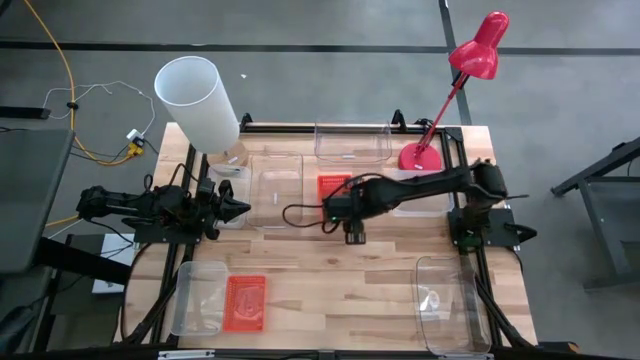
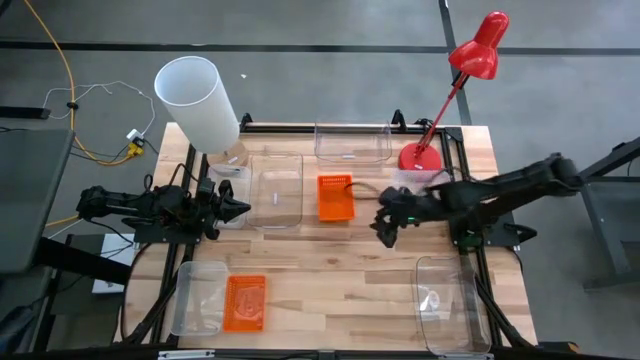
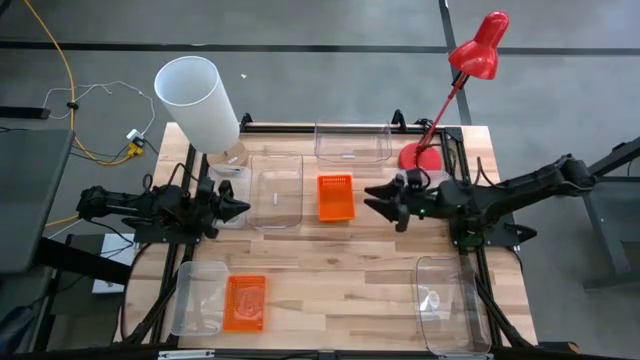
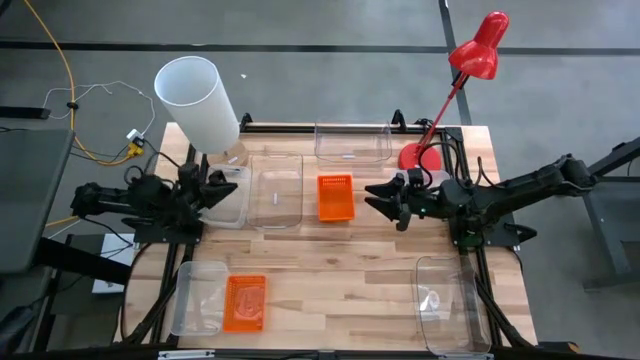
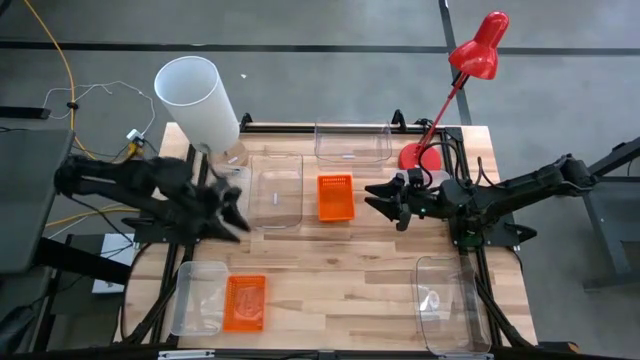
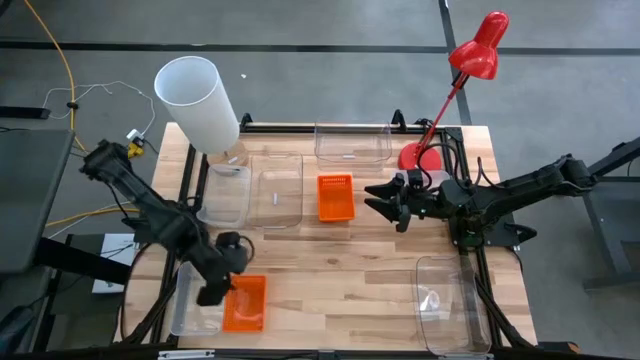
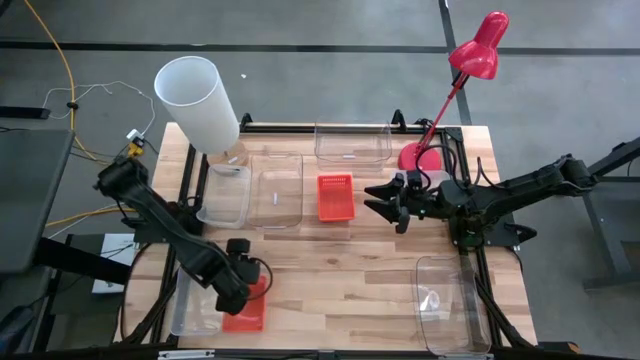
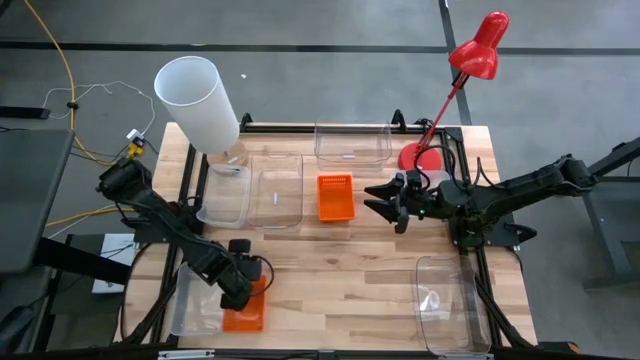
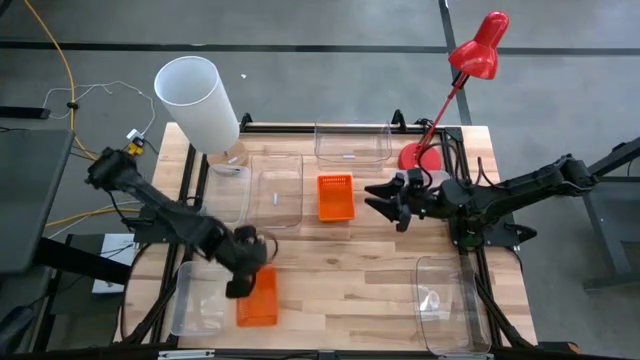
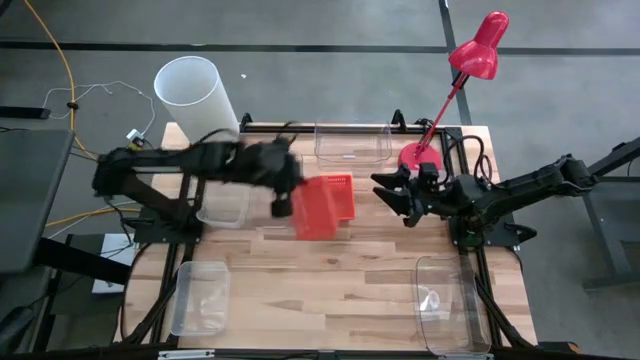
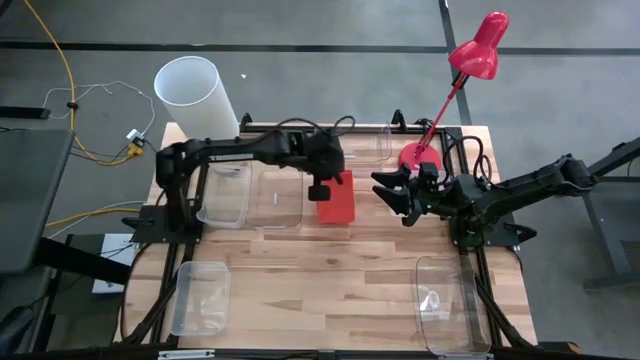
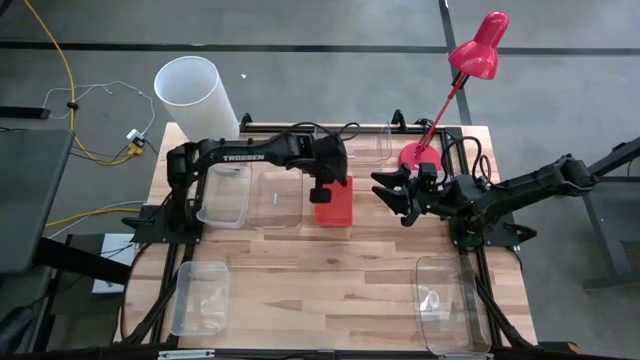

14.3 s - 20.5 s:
Stack the bottom orange bin on top of the top orange bin

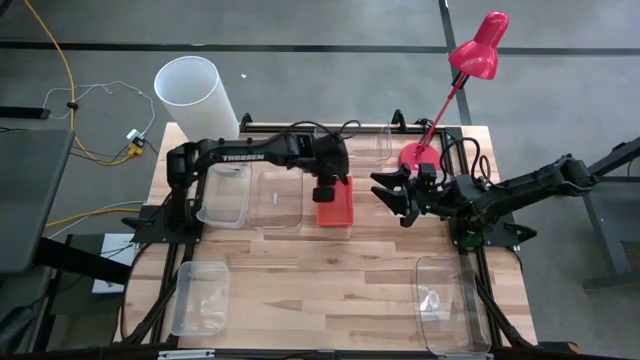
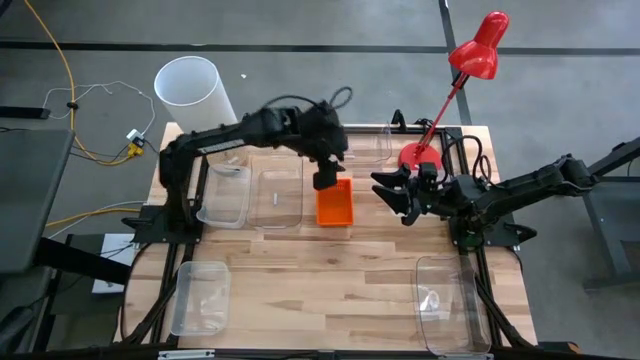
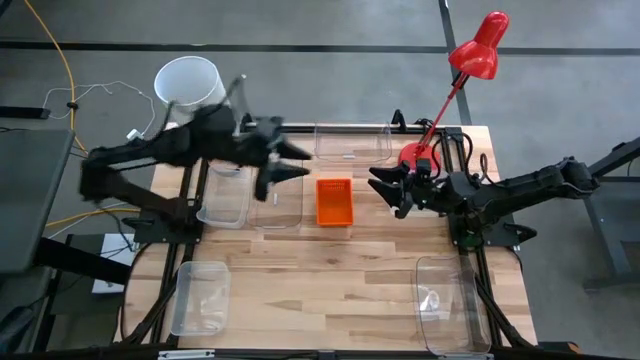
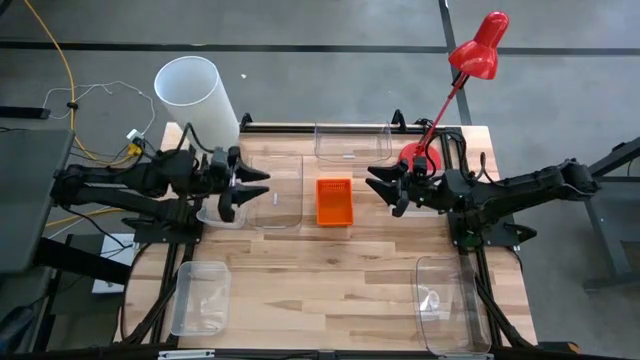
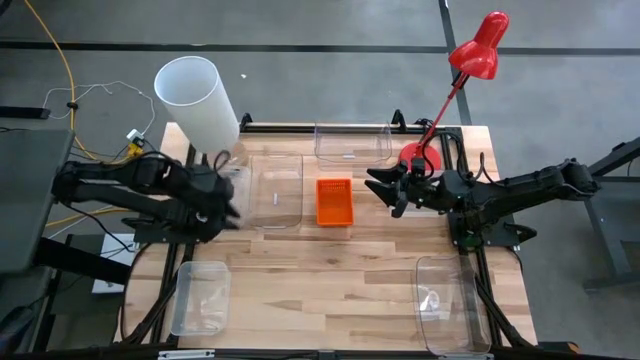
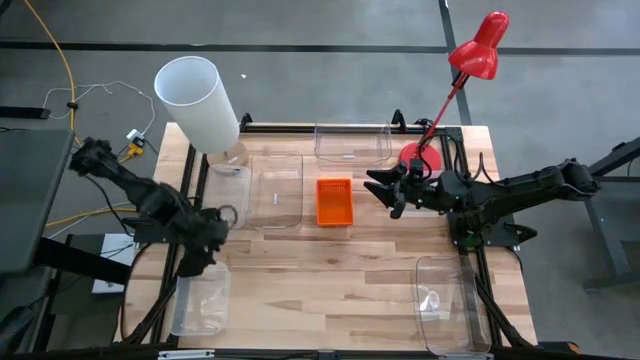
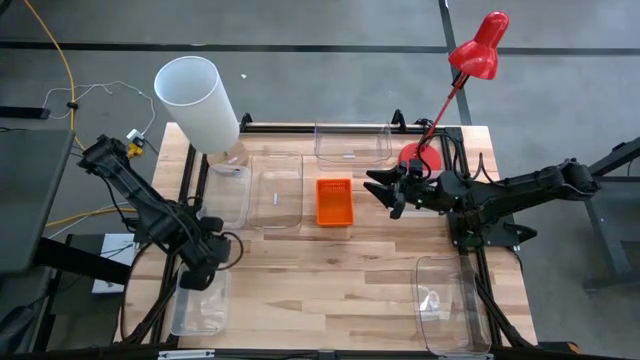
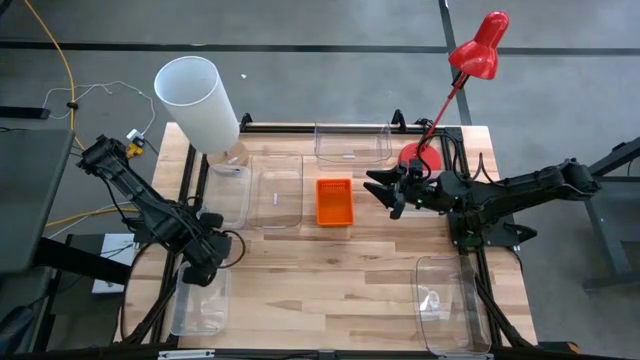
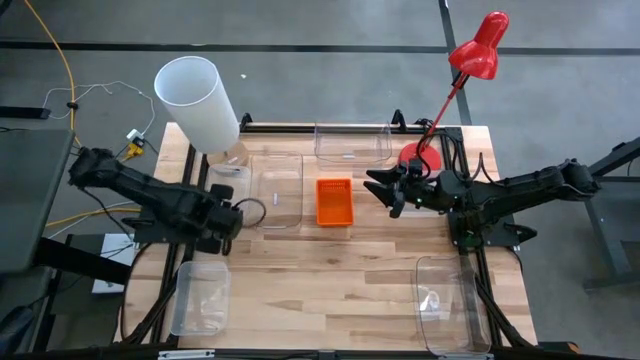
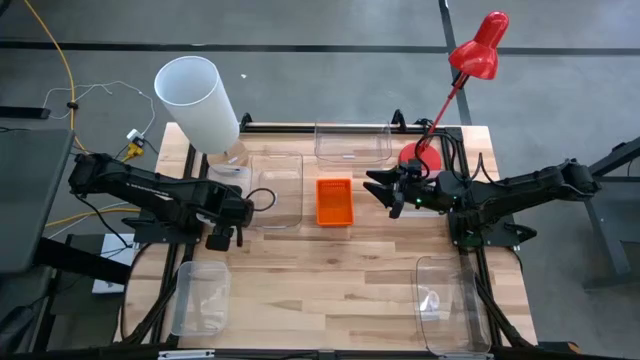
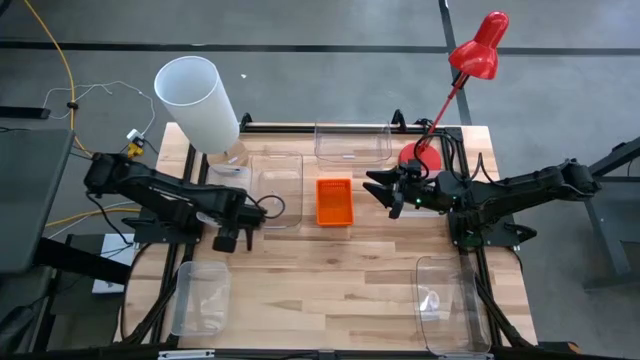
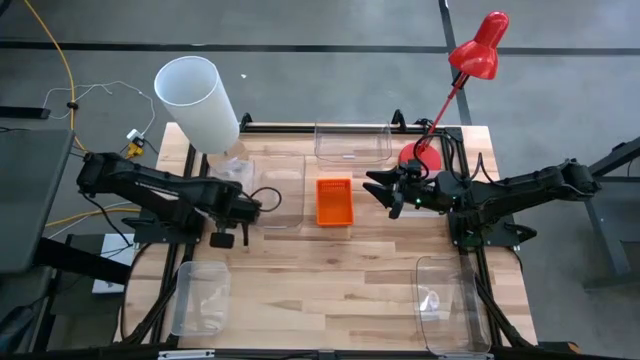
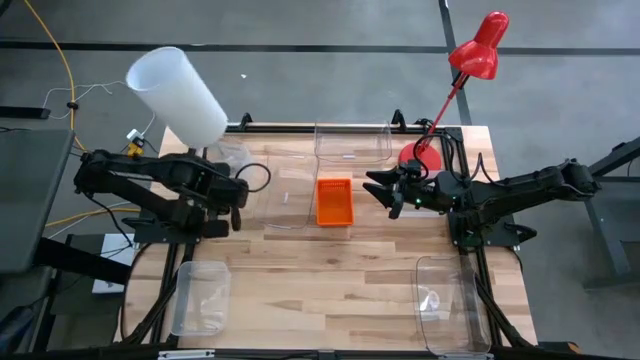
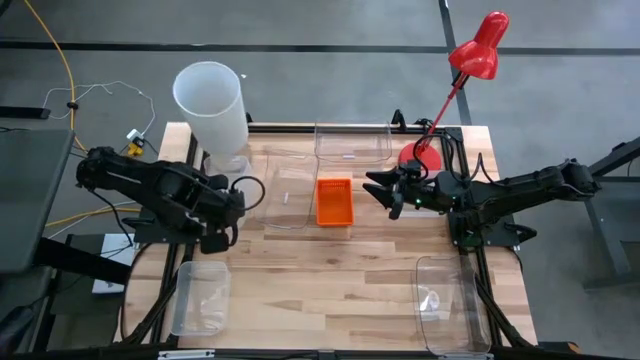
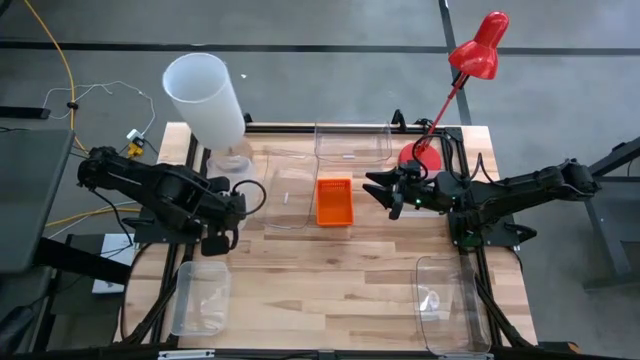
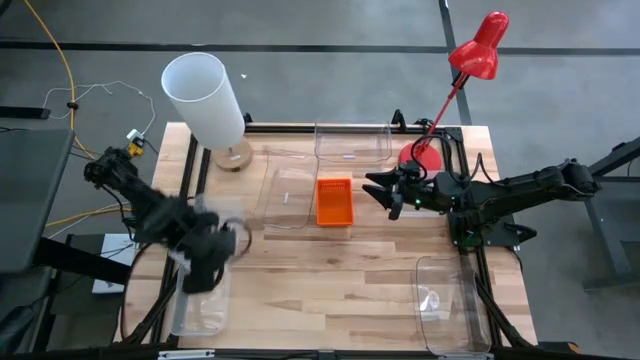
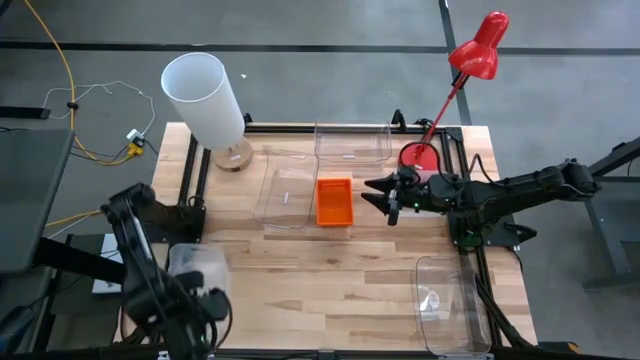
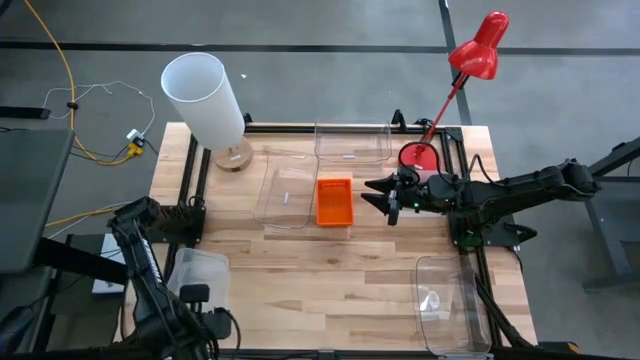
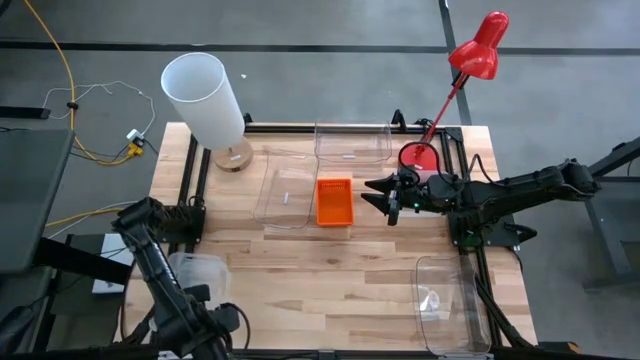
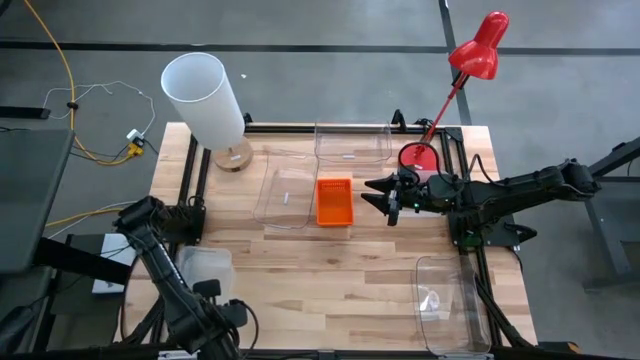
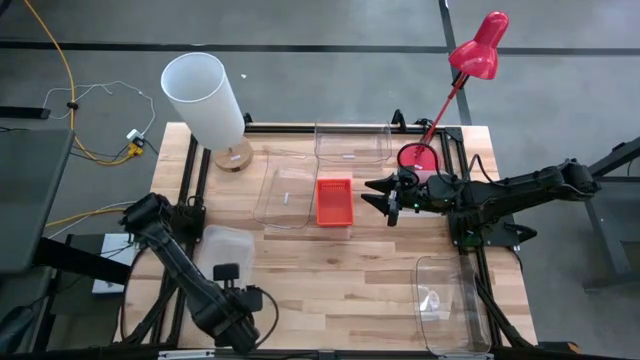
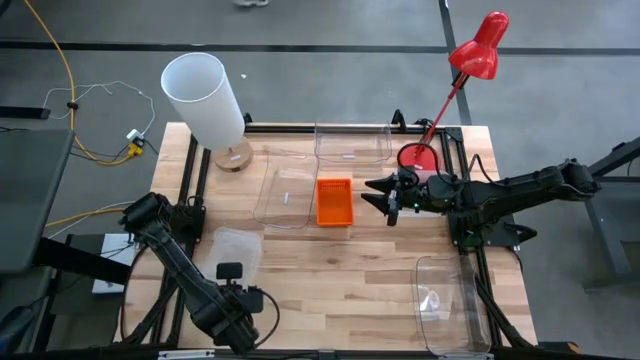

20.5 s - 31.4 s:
Stack the top left white bin on top of the bottom white bin
